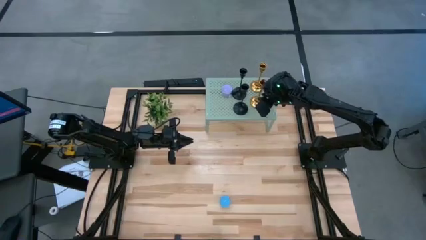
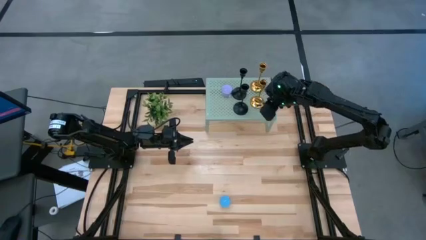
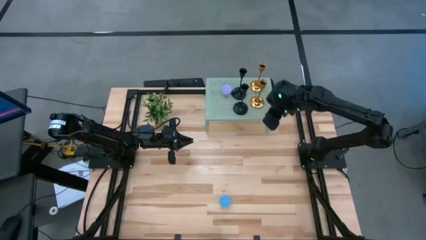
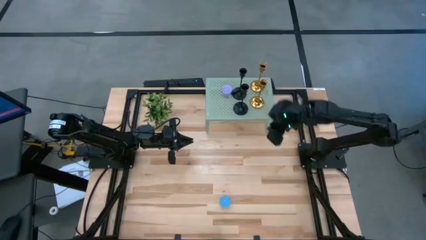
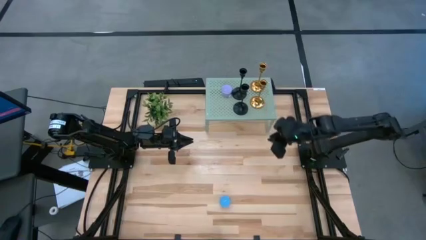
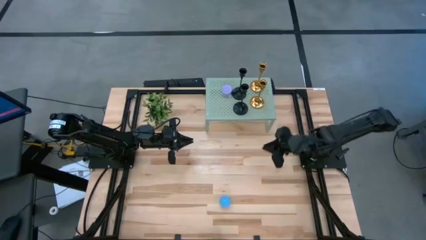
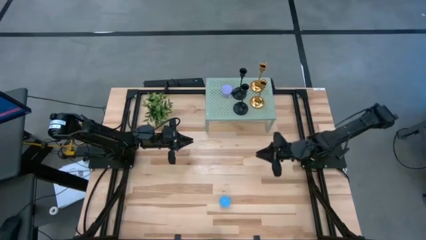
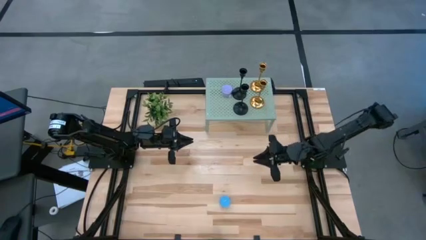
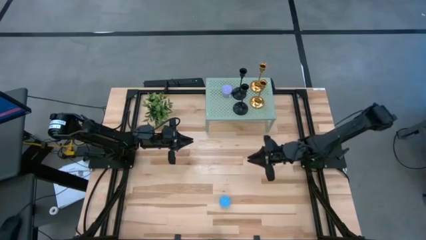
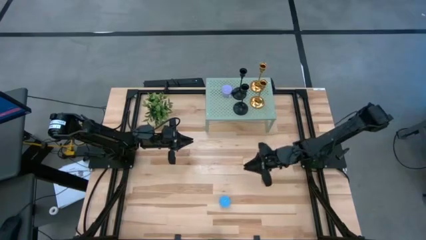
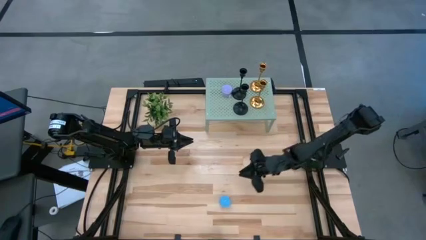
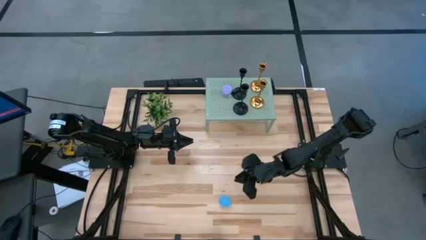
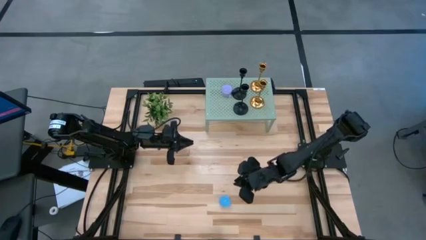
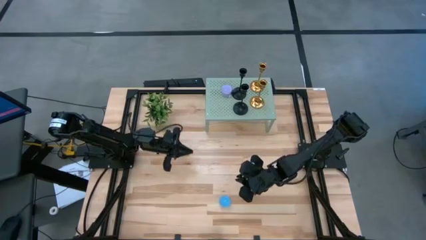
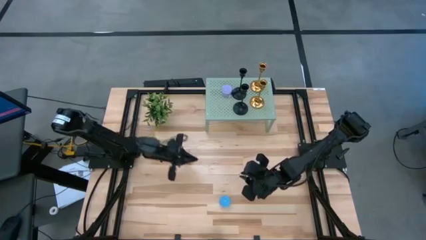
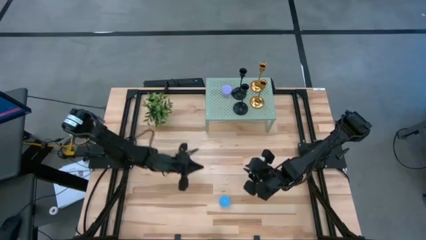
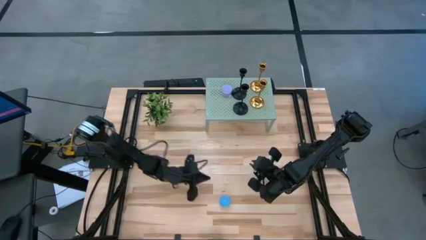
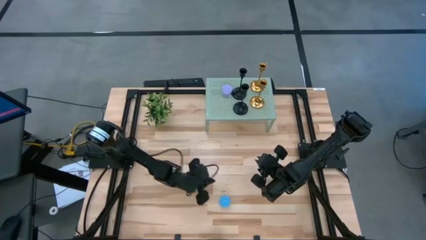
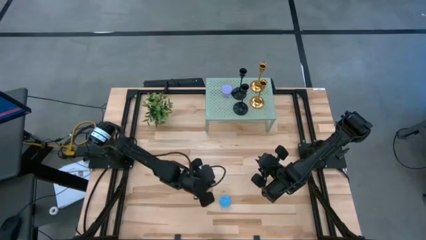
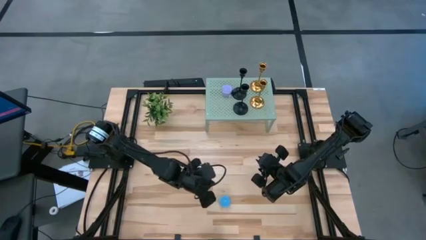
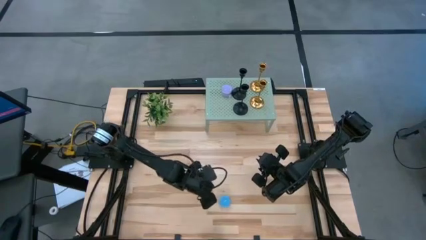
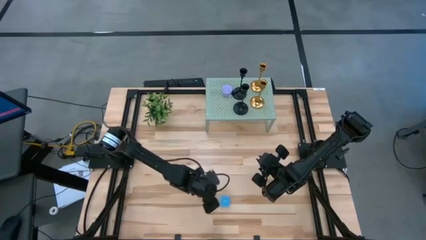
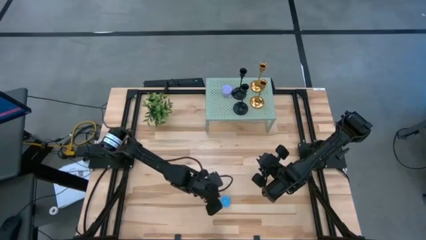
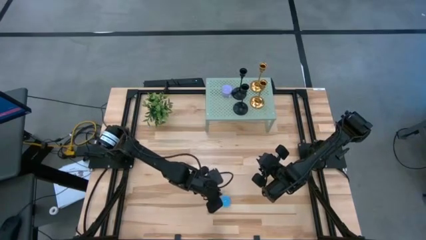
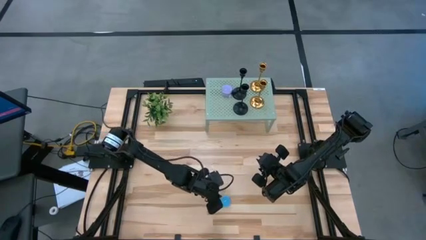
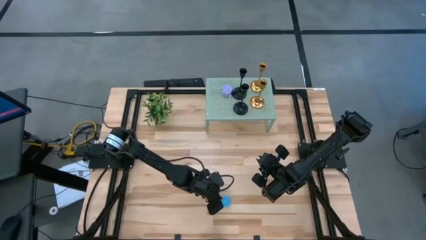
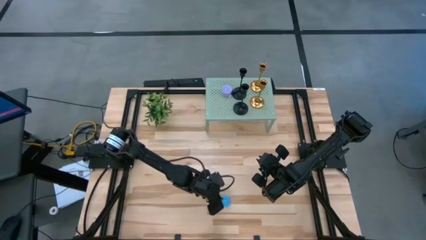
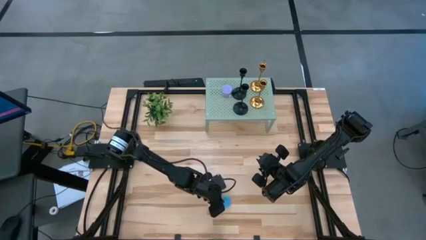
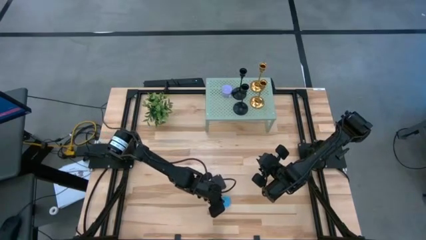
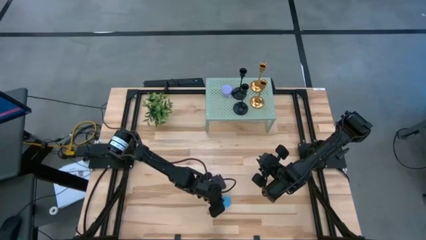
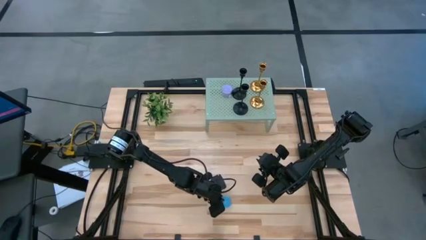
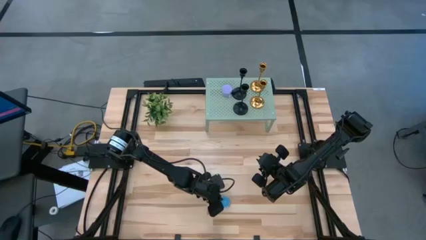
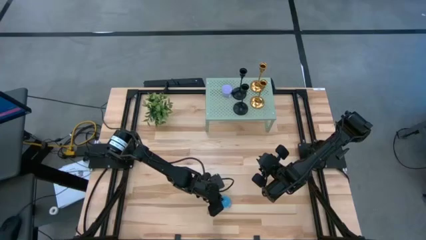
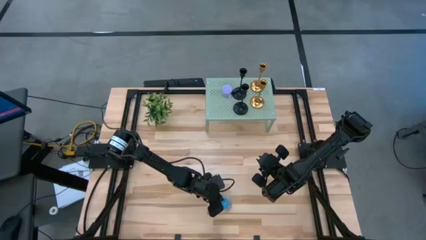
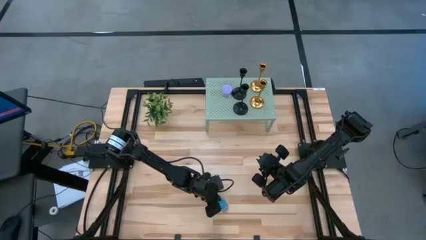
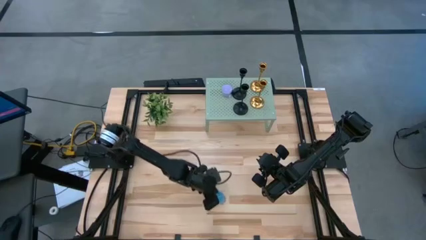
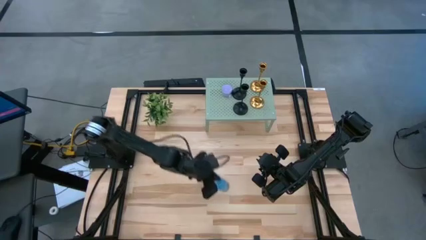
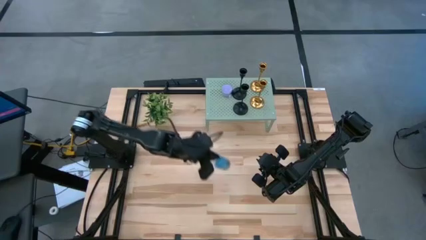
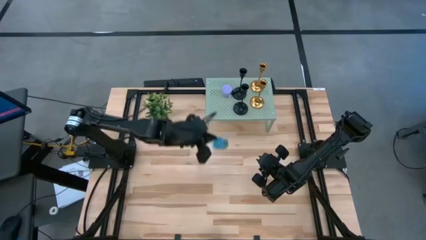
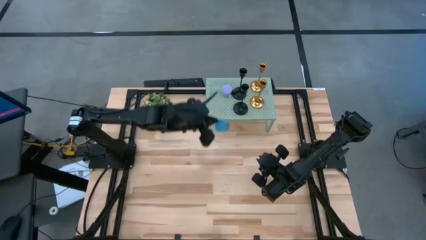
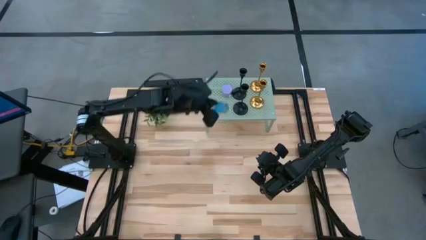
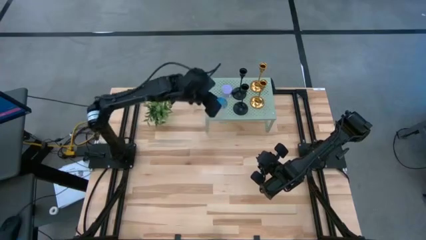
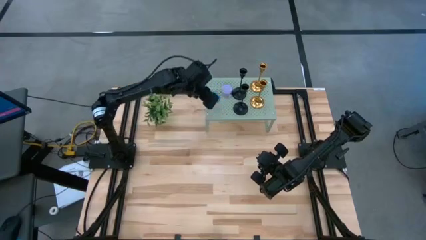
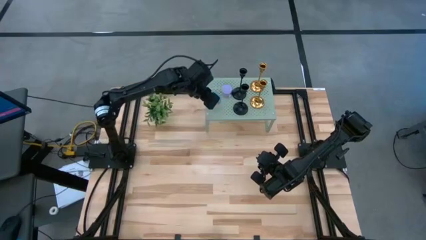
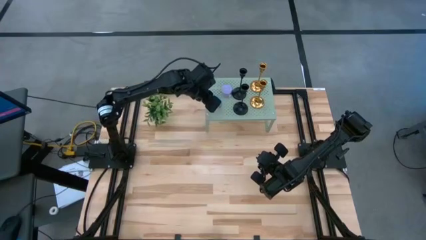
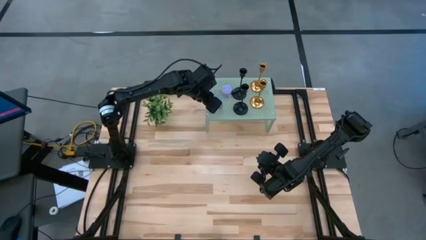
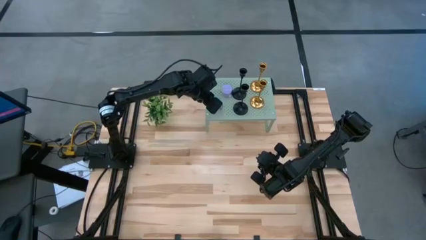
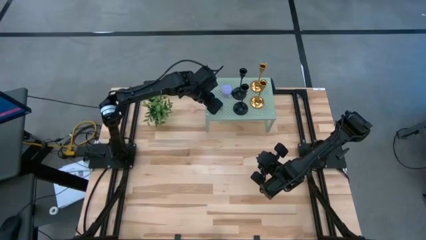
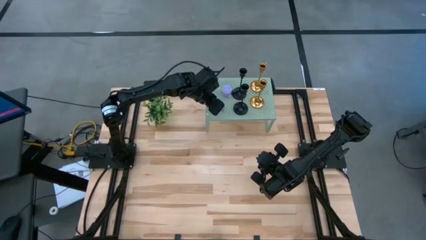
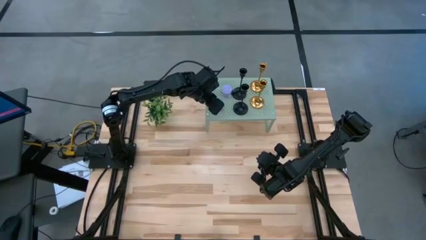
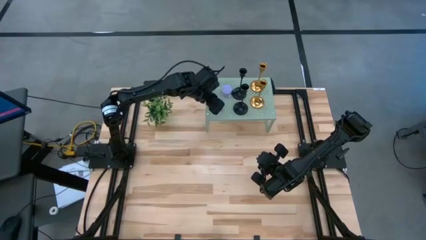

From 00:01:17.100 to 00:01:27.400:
Task: Pick & Place candle stick holders
Put the blue candle on the shelf

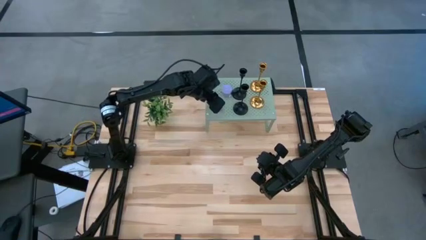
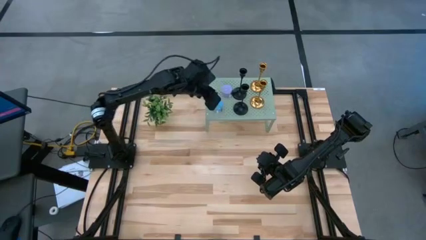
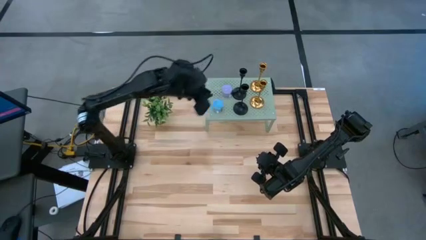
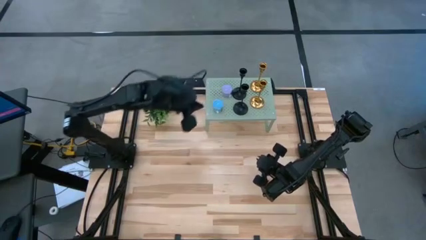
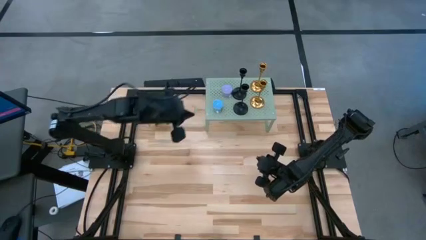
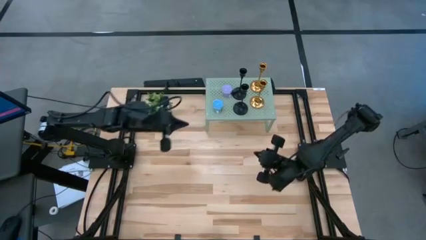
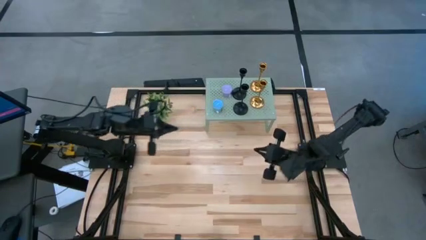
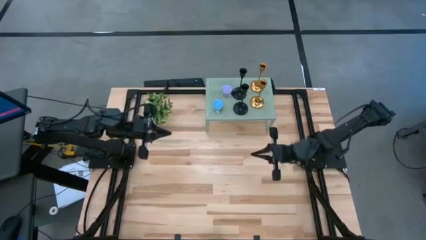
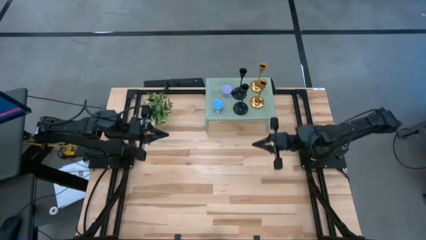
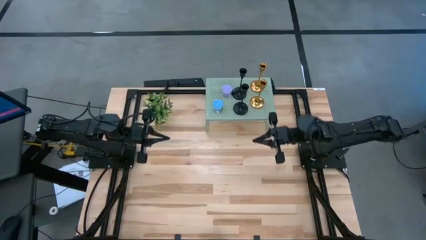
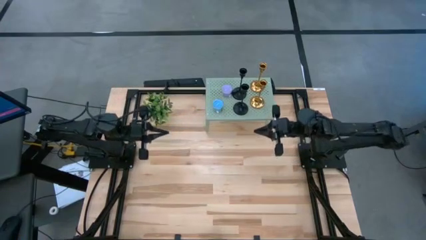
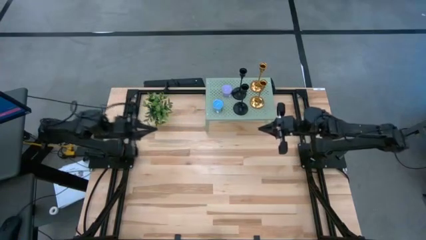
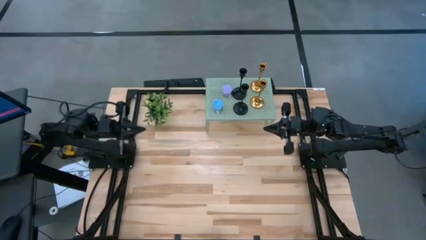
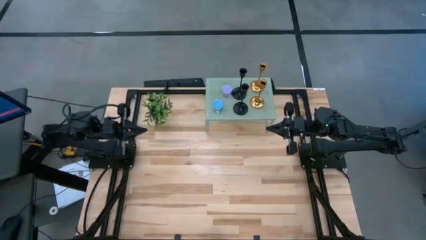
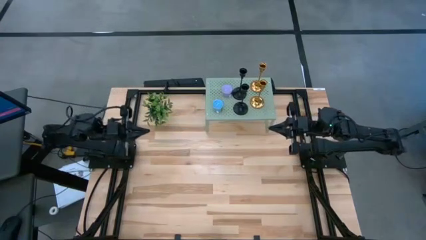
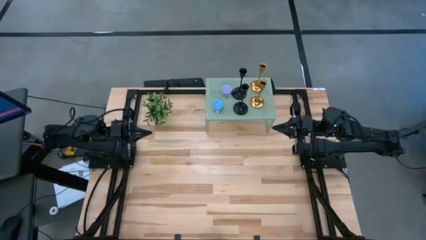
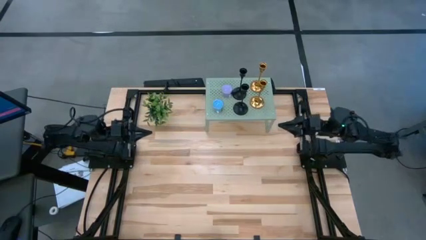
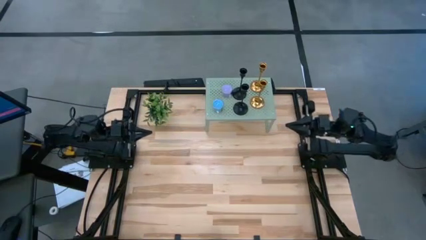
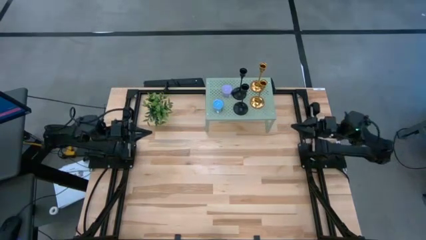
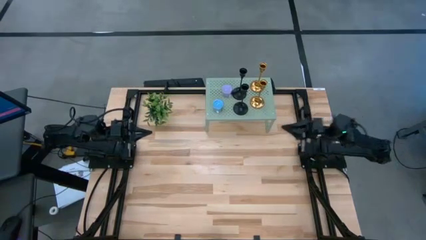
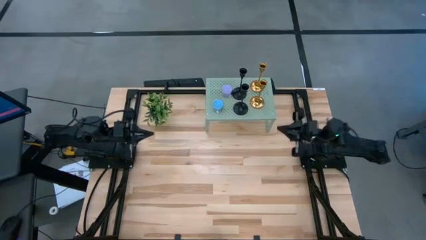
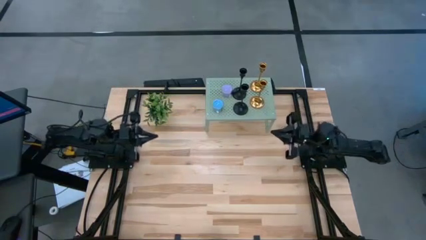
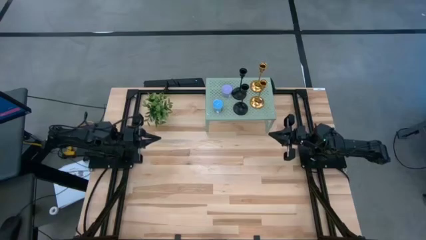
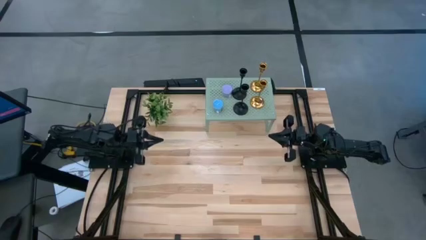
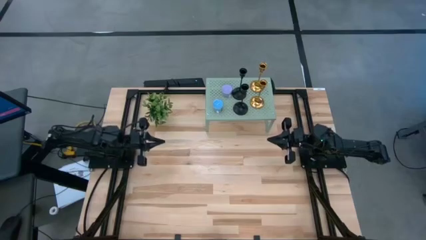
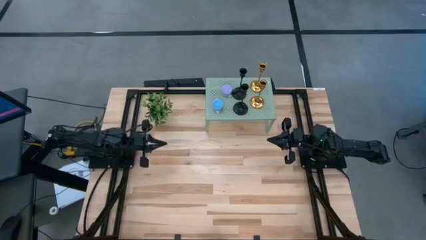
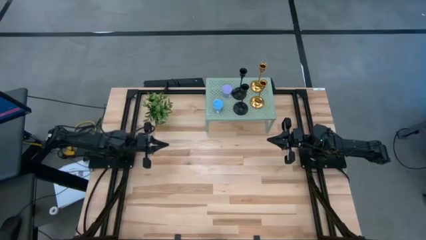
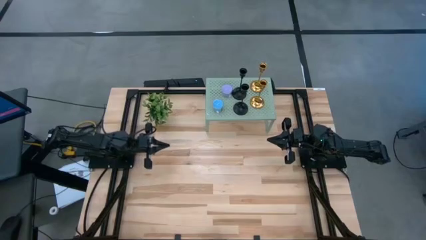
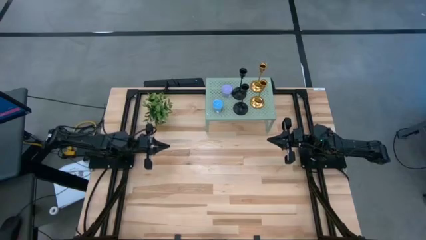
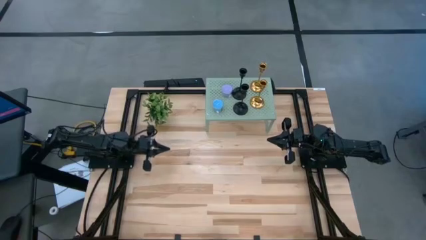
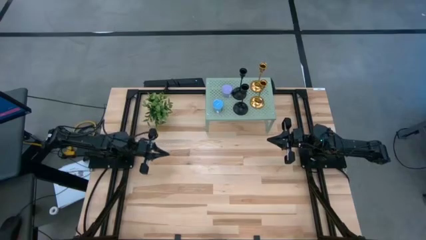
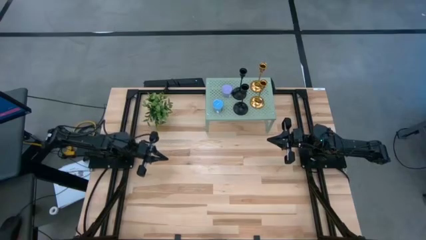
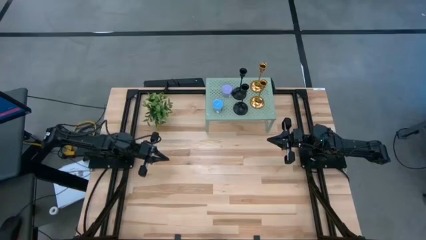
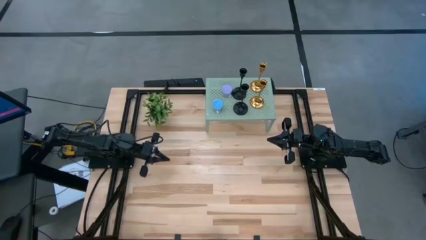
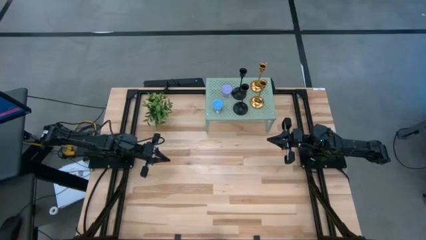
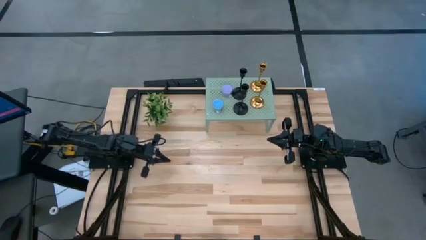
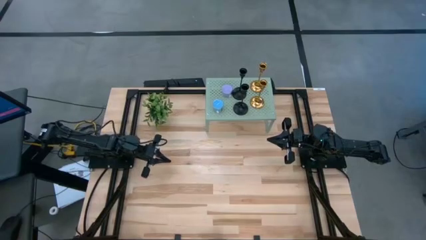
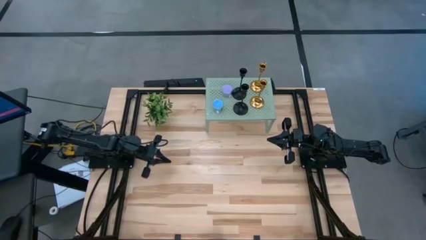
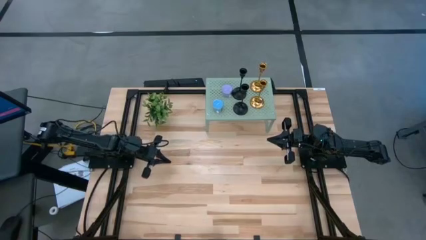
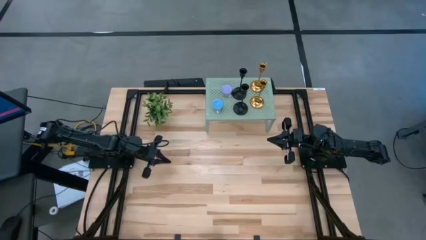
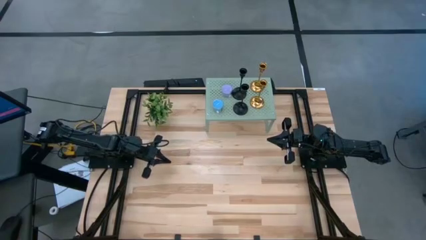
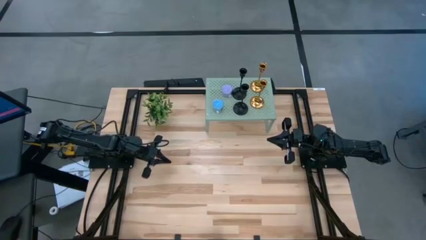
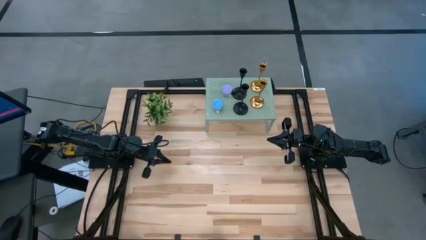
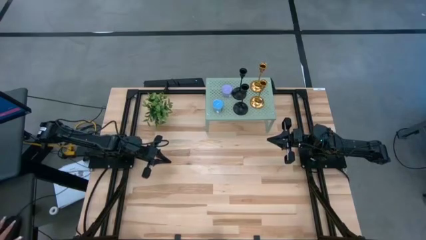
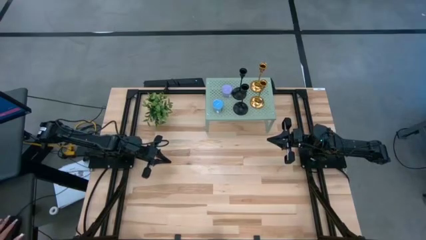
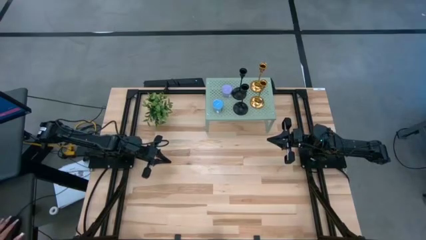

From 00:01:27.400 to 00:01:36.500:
Return to Home Position
